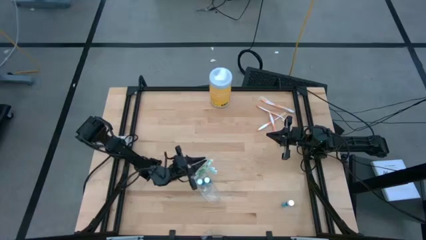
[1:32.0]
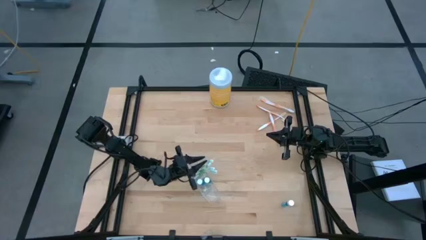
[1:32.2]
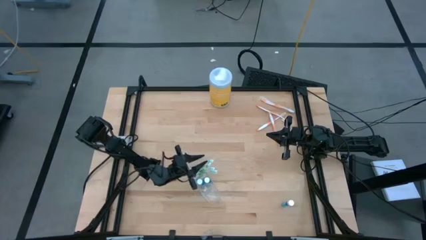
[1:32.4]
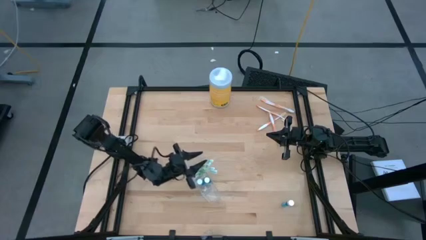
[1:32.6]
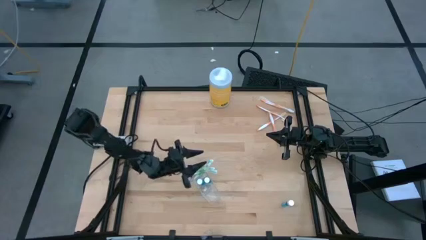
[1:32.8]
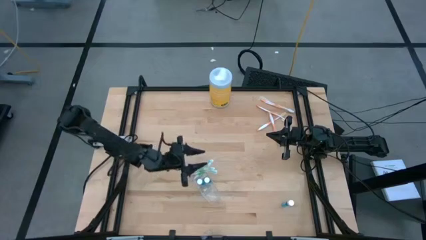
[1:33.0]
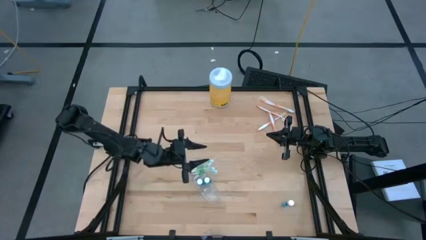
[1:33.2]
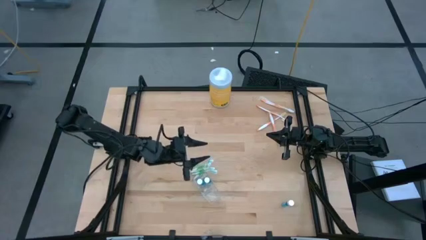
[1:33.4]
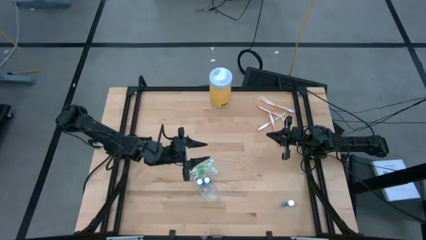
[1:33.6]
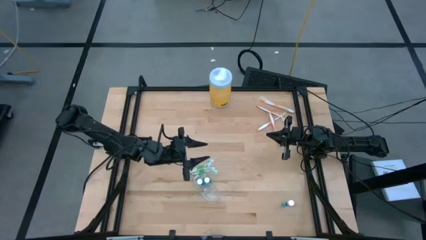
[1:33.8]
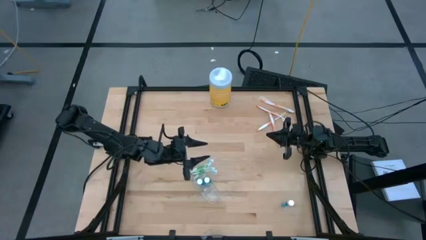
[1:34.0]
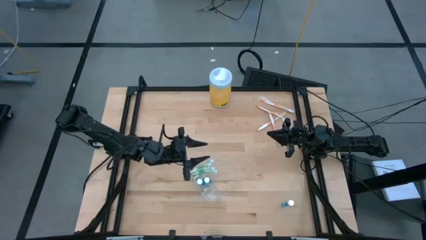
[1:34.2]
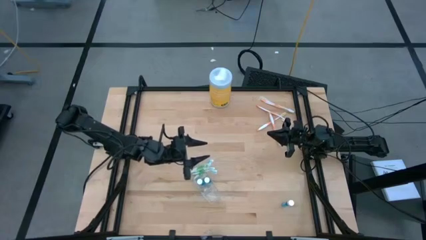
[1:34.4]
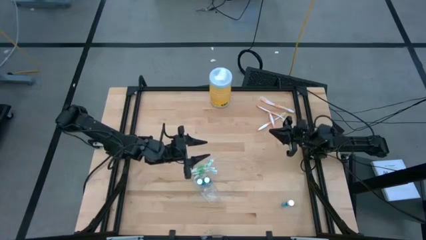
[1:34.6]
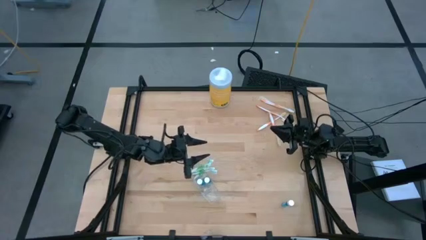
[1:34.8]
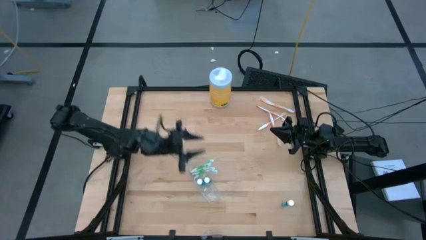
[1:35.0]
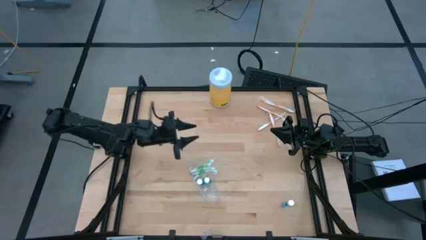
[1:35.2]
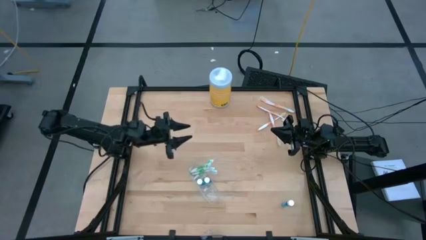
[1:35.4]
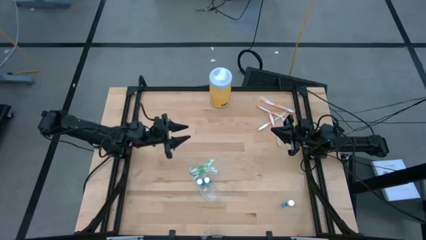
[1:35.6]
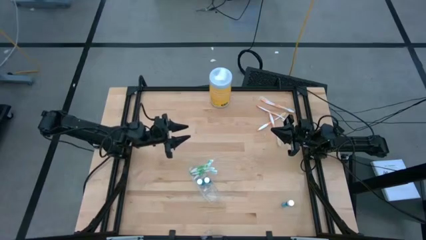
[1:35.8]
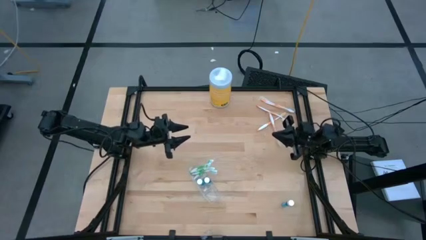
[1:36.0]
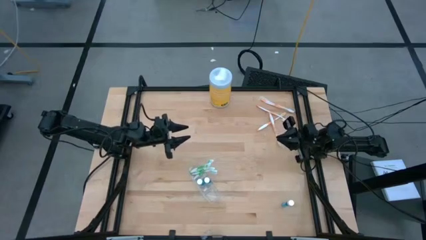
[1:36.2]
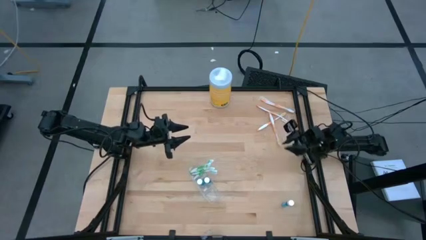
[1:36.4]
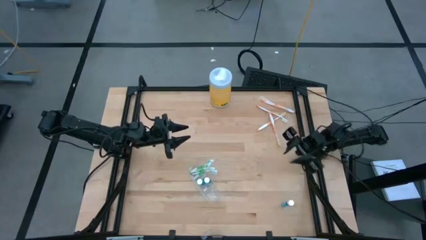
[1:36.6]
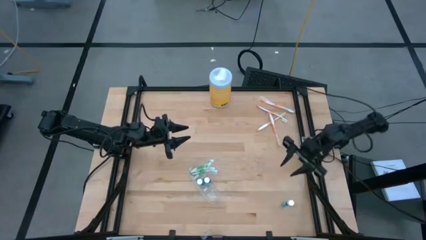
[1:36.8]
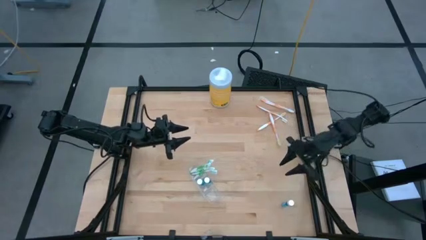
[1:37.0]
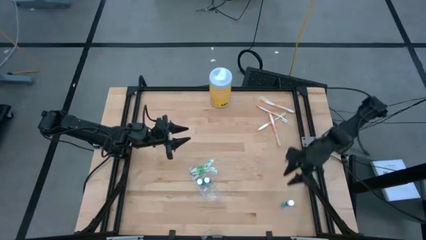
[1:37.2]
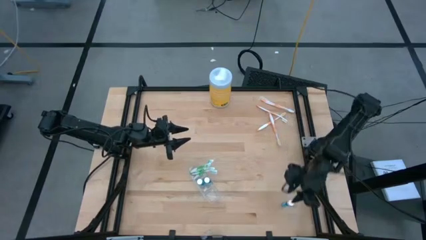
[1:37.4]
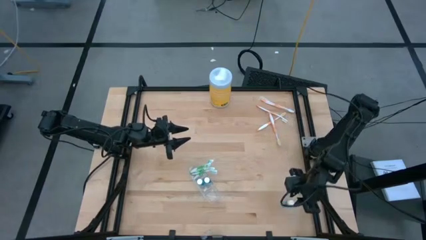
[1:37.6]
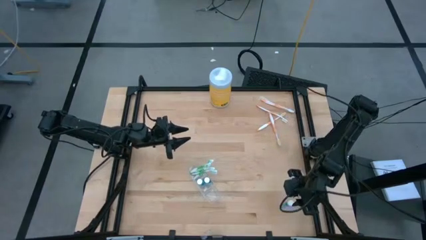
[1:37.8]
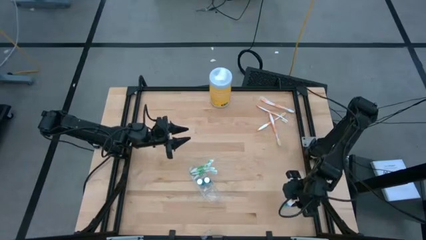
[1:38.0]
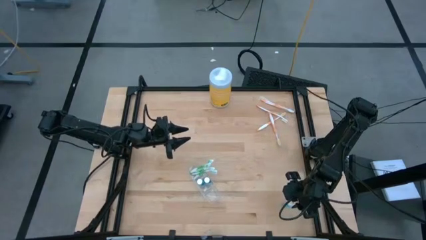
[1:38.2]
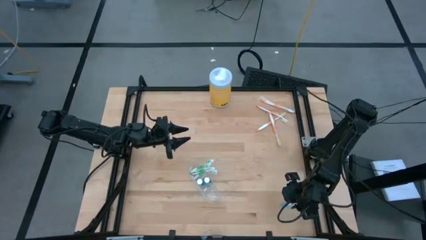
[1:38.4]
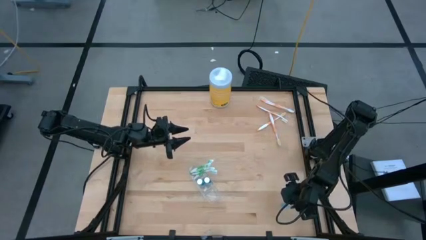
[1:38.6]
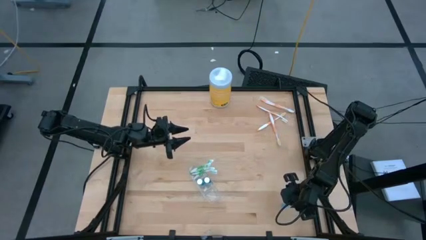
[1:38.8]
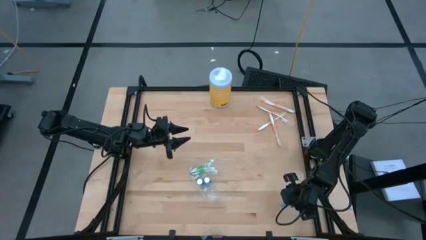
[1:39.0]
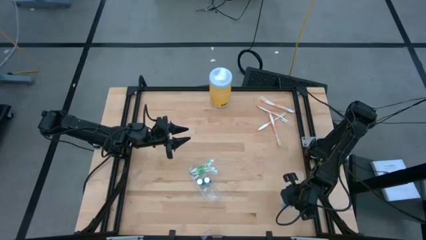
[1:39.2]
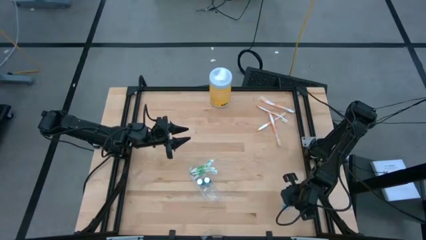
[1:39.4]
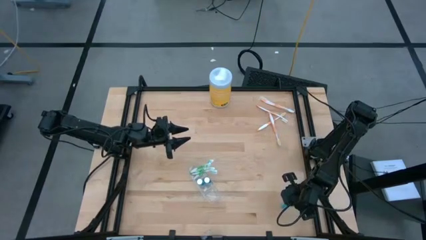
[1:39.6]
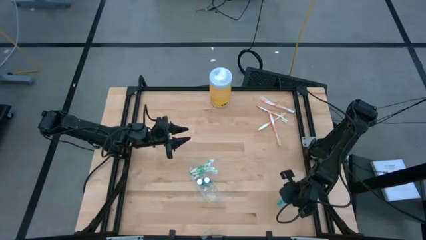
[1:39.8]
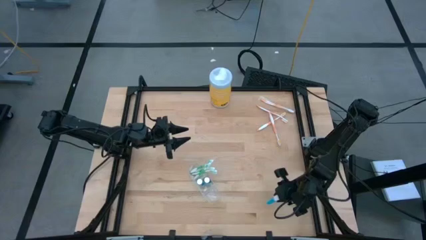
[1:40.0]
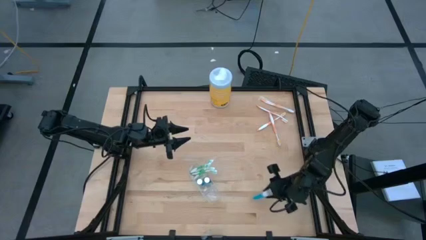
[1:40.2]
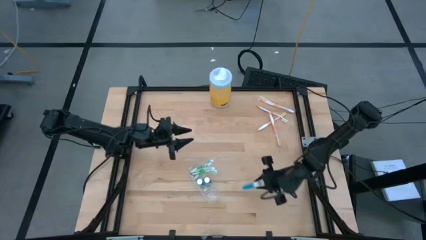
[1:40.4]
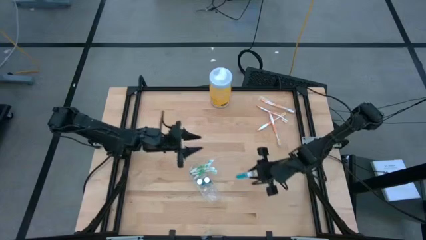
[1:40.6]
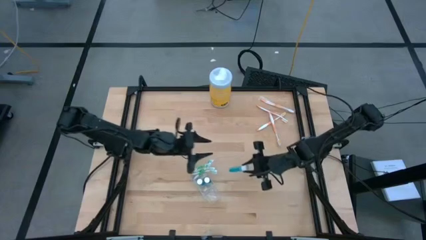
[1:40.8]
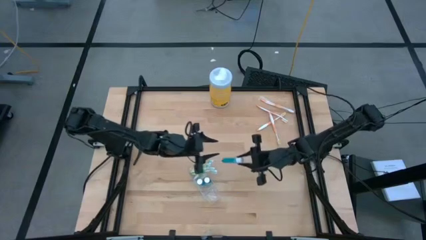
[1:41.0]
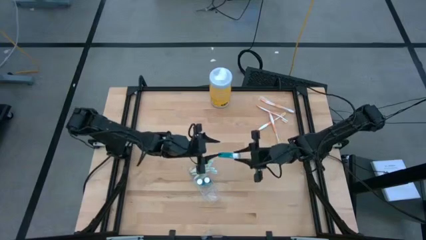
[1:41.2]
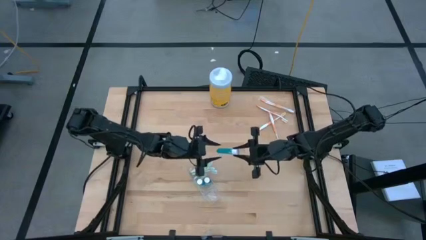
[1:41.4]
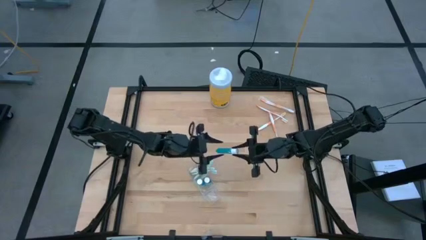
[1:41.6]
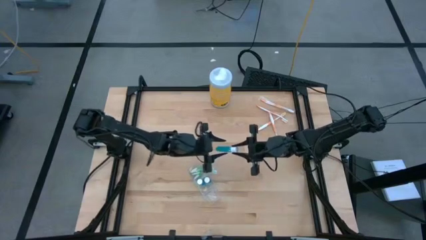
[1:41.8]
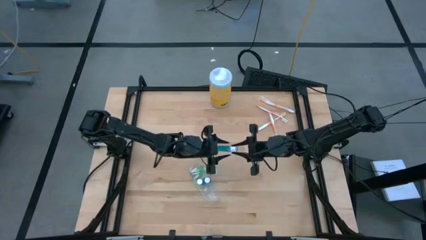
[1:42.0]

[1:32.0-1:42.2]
Task: Pick & Place toothbrushing station
Put the blue mouthwash into the transparent organizer

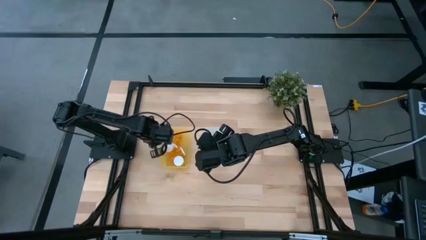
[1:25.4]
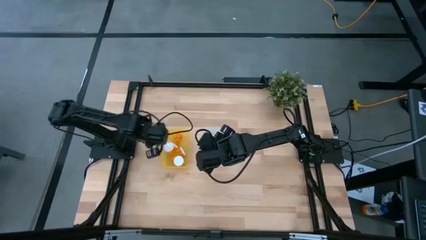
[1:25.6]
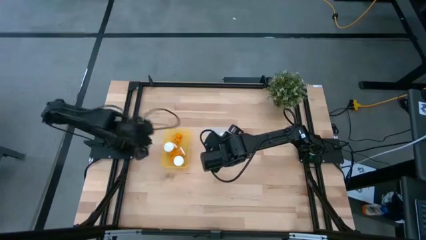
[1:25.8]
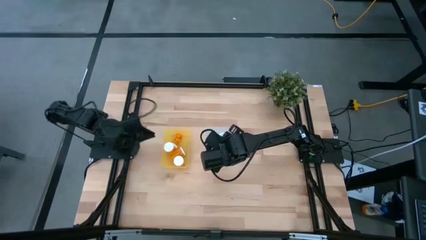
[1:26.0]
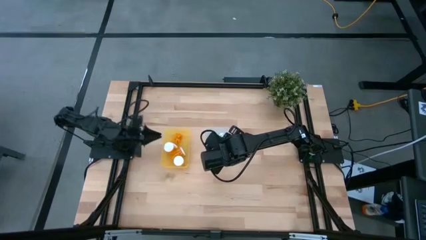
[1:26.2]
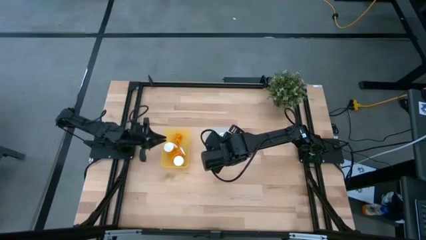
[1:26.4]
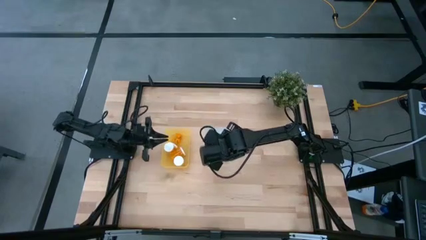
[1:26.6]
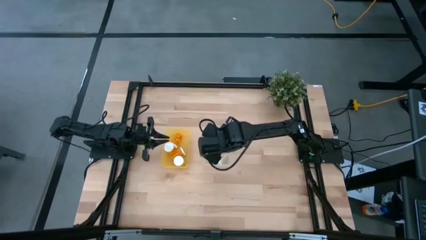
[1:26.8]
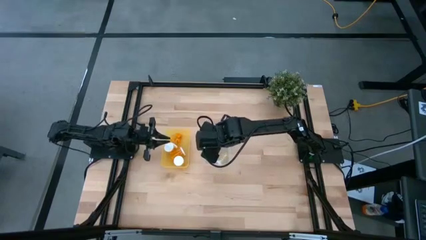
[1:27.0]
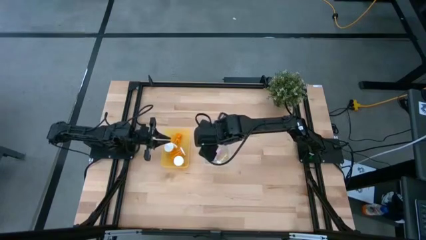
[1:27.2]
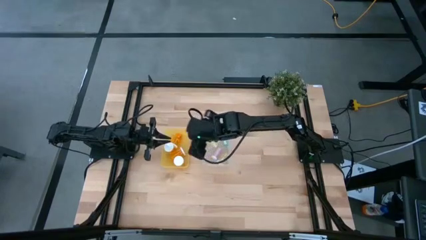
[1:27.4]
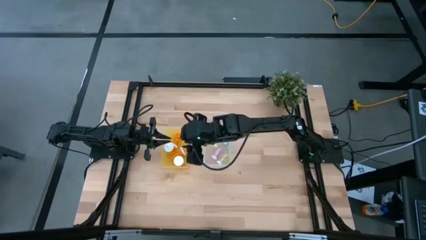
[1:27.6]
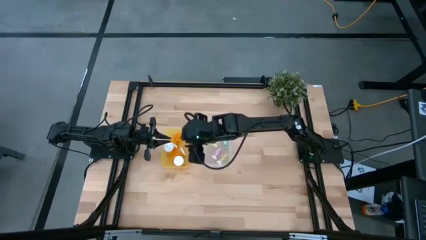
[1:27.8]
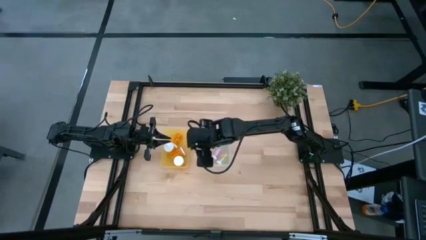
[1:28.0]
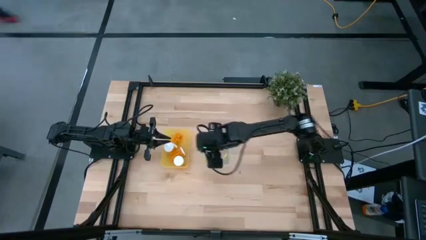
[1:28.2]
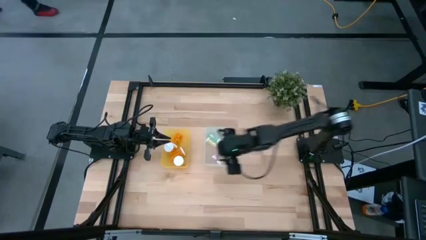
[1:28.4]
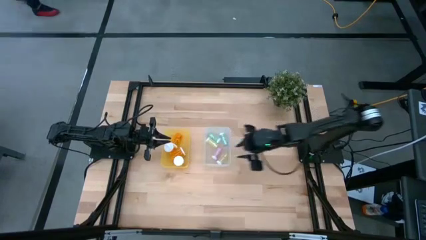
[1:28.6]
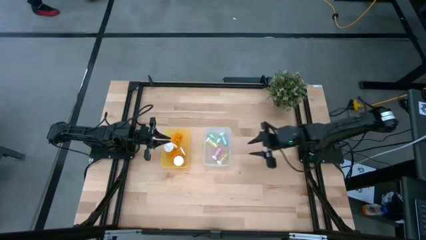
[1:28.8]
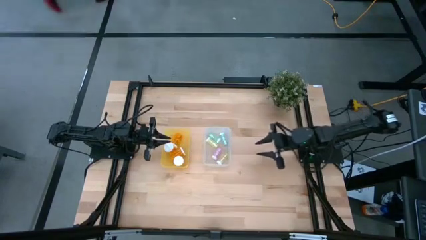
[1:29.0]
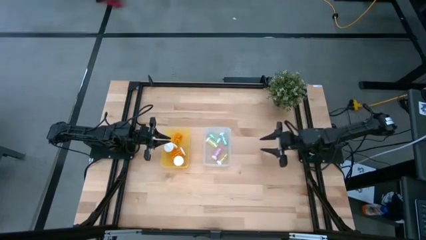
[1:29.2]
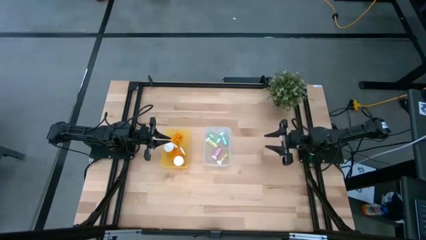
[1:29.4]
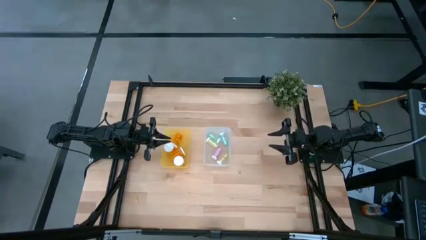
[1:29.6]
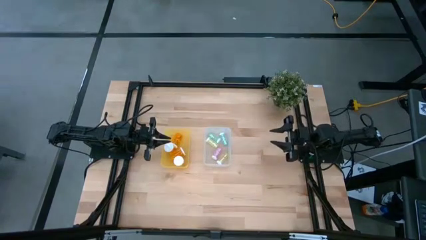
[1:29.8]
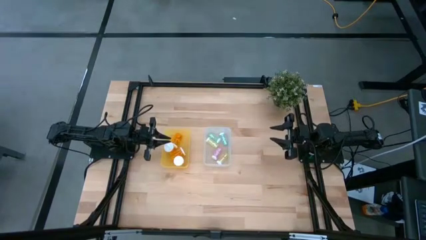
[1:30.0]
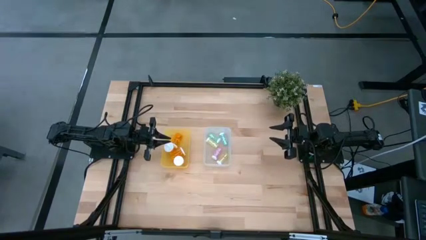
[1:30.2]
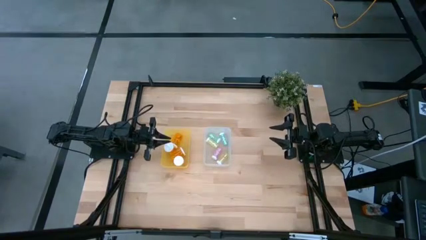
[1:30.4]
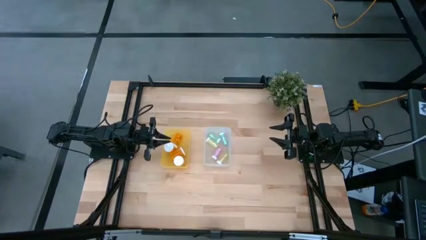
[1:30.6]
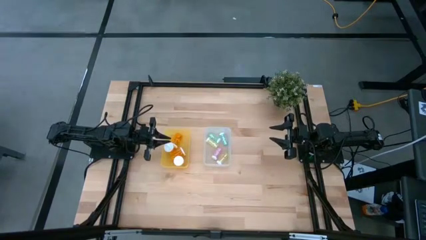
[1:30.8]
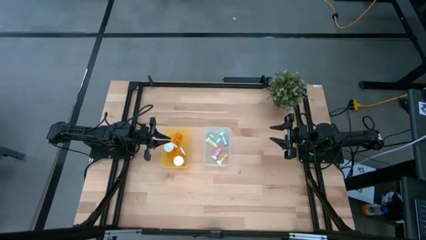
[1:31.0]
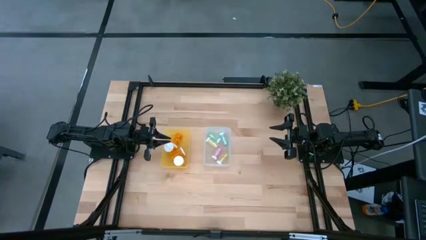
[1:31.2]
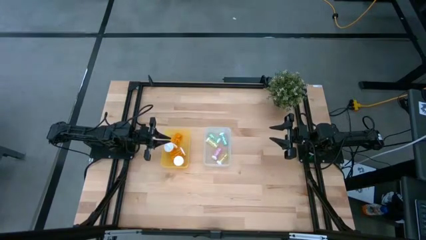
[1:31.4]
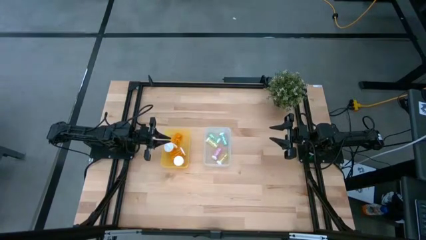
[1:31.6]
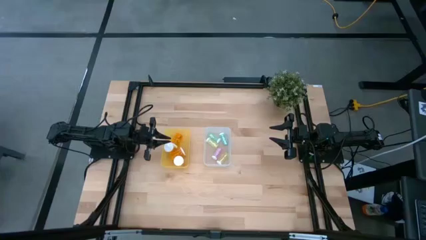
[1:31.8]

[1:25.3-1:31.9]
Task: Pick and place medicine bottles into bin by pill shape (circle, oval)
Return to Home Position
